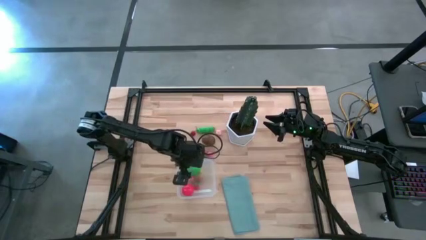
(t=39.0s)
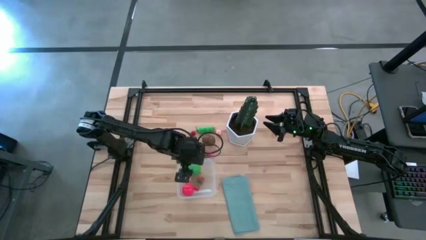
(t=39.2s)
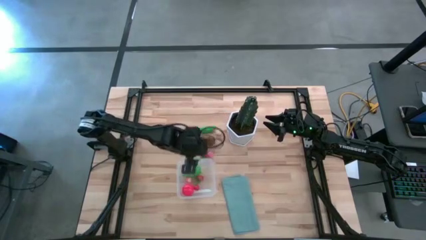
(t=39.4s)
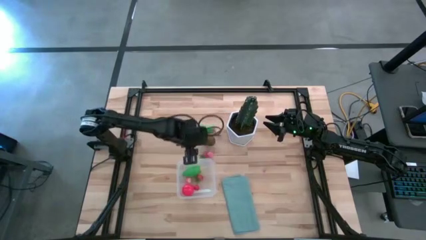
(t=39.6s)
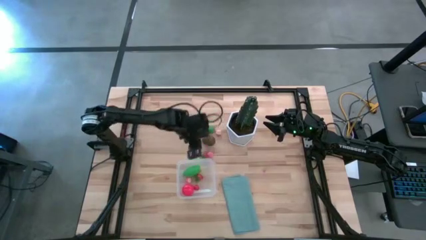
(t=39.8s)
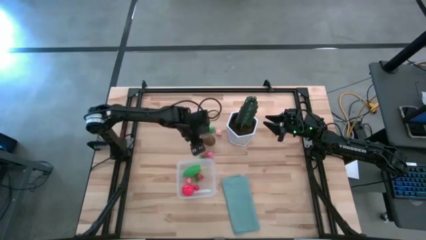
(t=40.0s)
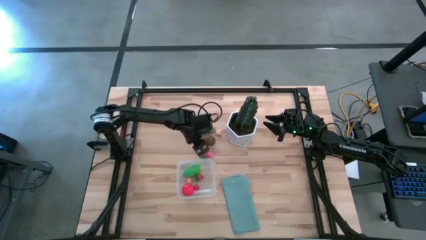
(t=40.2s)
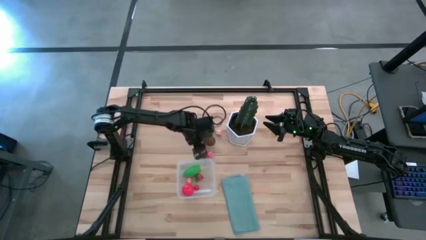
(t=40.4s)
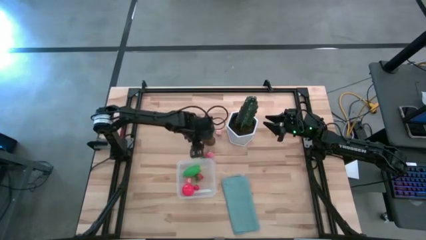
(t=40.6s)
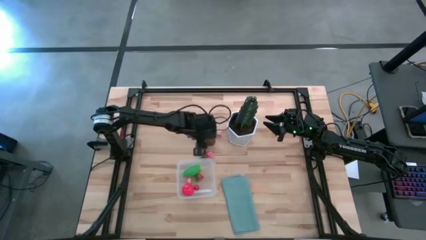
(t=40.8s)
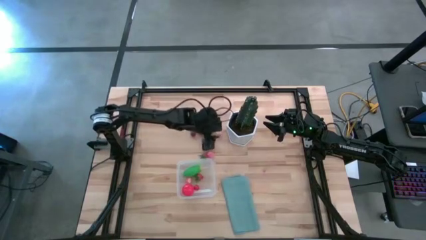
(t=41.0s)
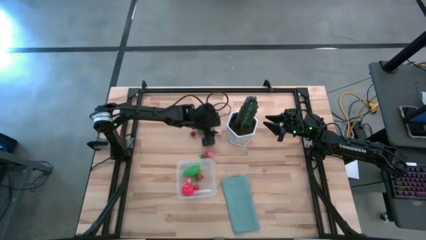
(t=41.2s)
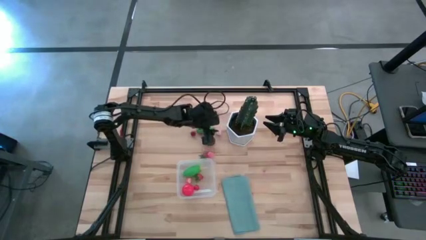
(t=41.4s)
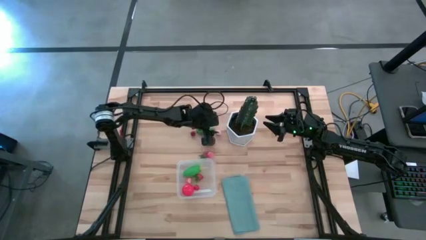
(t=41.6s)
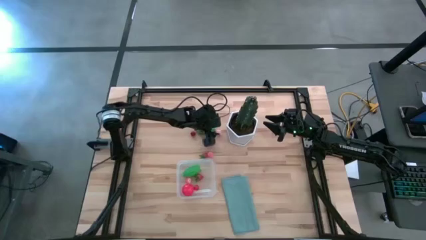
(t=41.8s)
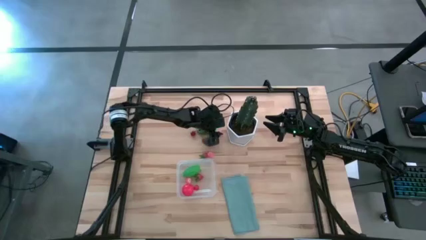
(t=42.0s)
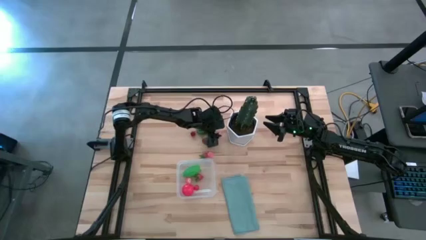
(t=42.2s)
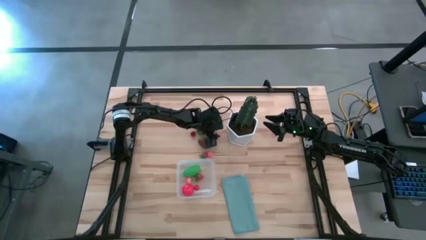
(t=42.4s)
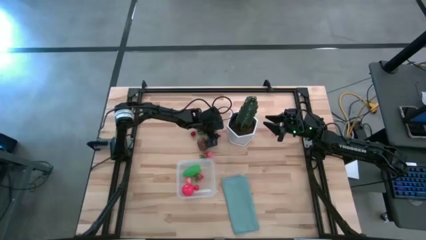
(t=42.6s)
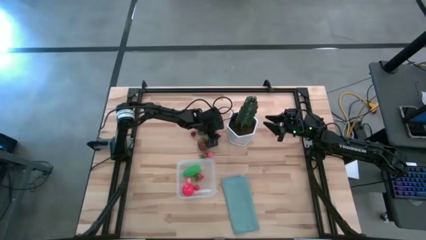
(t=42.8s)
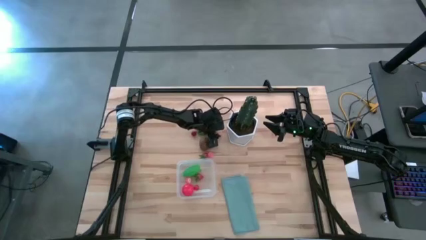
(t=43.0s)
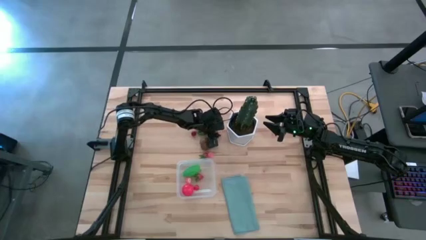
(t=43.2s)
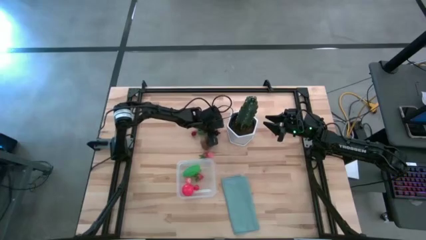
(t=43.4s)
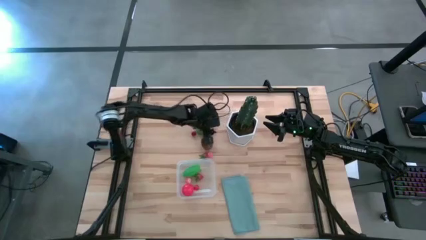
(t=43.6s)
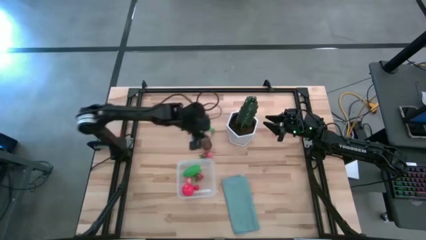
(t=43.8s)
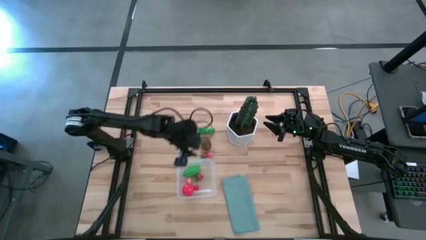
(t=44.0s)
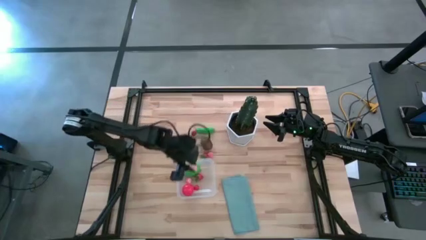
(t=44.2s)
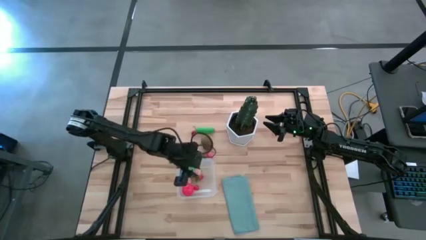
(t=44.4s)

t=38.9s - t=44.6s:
Task: Pick and placing Produce into tupperware
Put the pink peach into the transparent bin

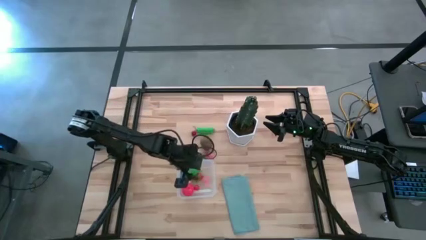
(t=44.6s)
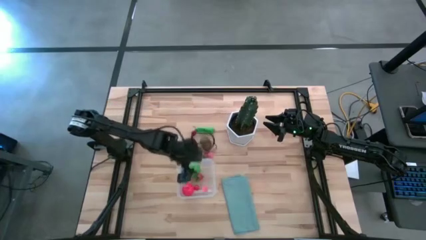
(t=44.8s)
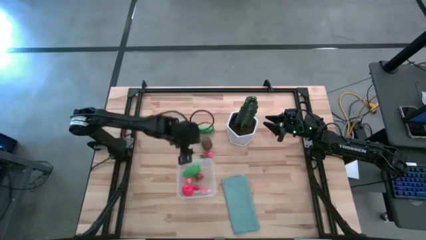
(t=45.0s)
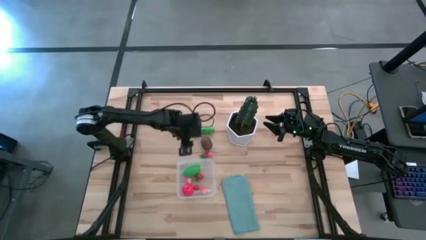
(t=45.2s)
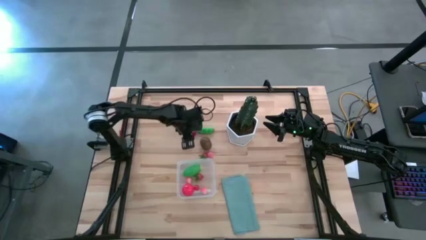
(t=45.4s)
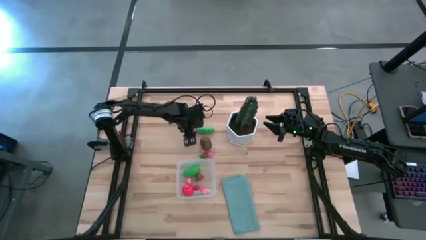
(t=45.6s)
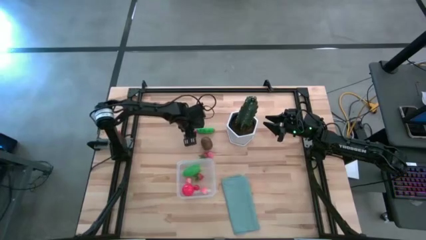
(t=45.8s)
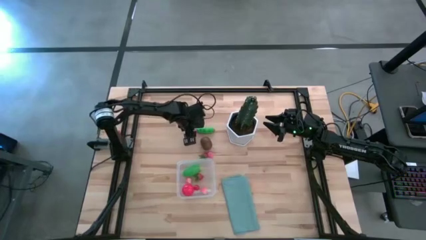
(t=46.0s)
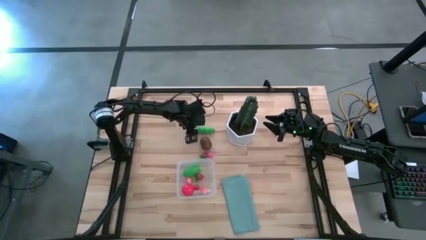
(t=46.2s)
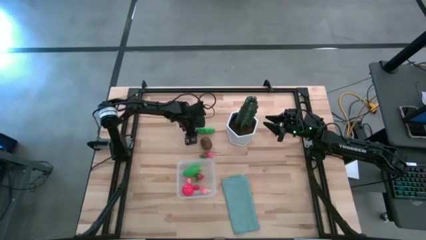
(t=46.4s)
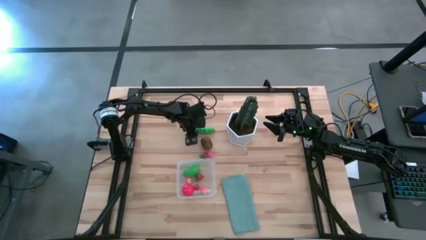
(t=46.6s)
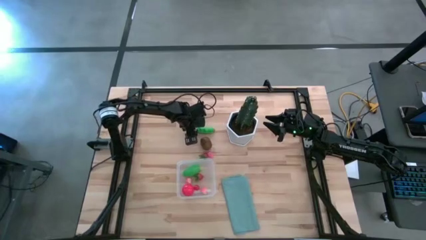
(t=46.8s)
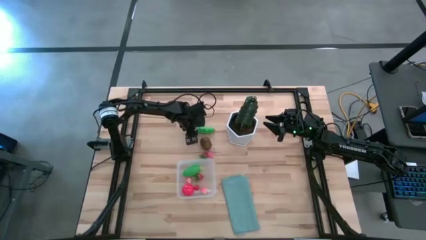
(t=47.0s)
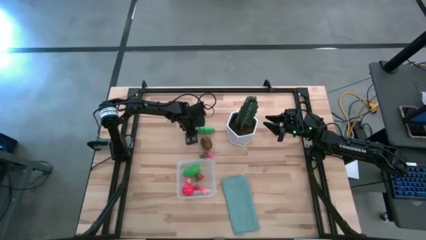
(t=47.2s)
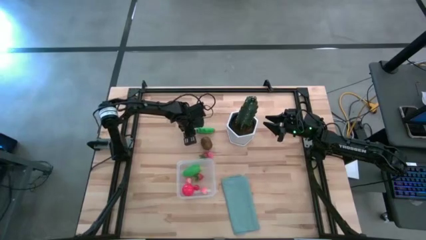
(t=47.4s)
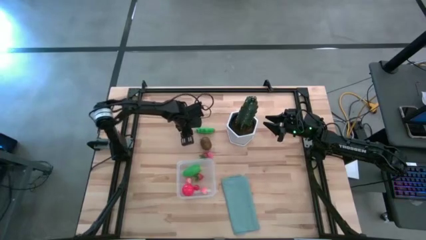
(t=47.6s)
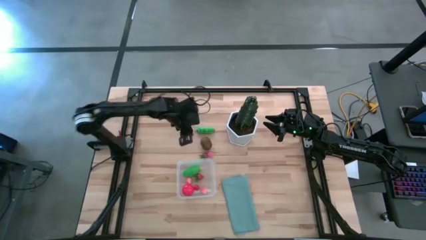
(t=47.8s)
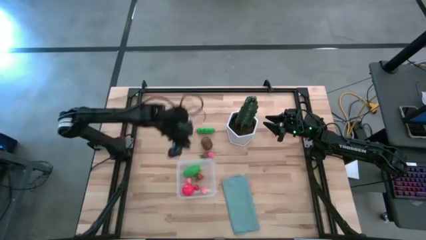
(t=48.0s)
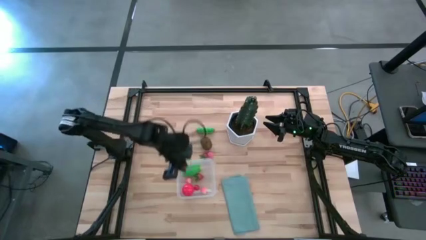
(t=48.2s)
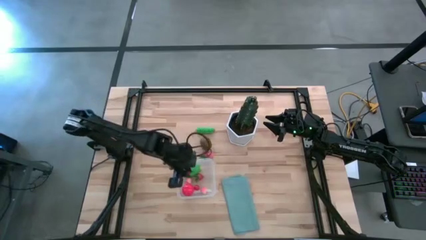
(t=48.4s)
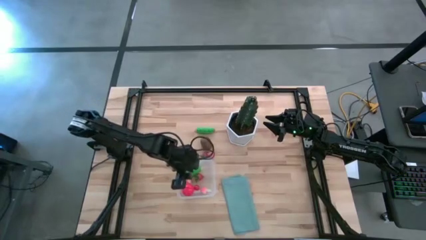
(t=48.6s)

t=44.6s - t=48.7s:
Put the red cherry into the transparent bin

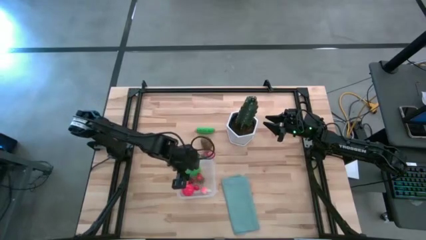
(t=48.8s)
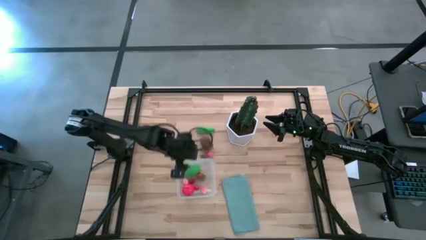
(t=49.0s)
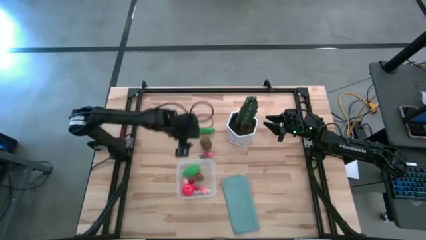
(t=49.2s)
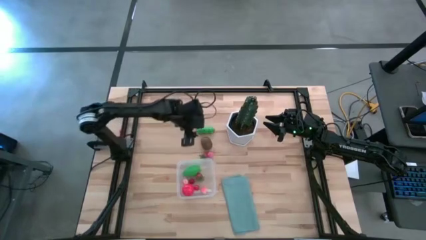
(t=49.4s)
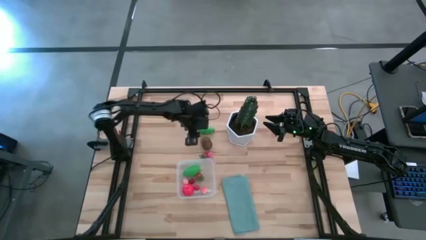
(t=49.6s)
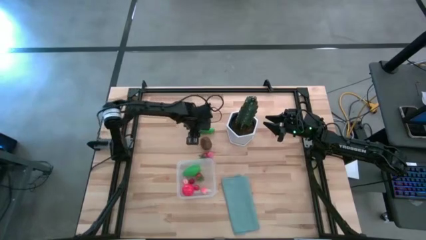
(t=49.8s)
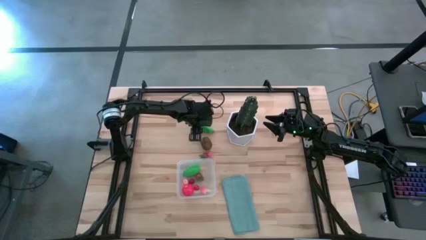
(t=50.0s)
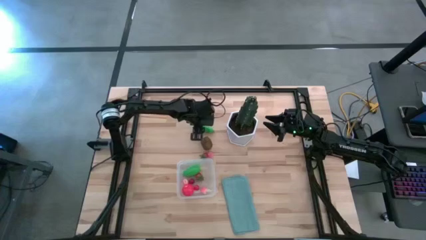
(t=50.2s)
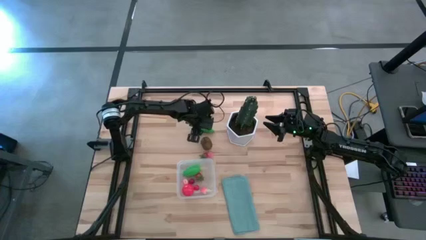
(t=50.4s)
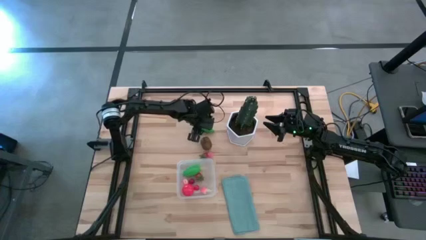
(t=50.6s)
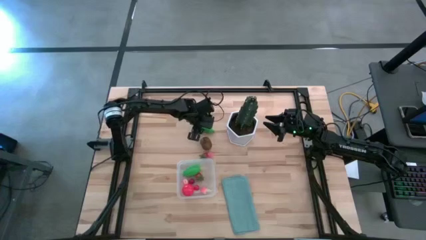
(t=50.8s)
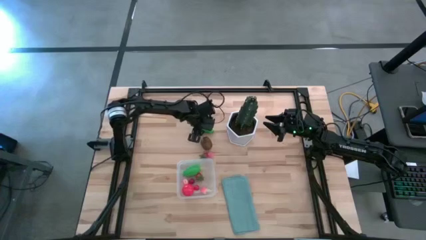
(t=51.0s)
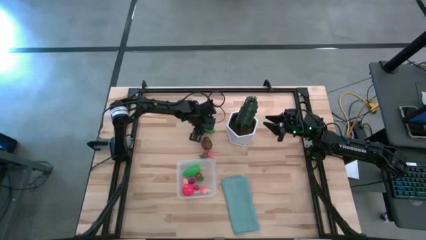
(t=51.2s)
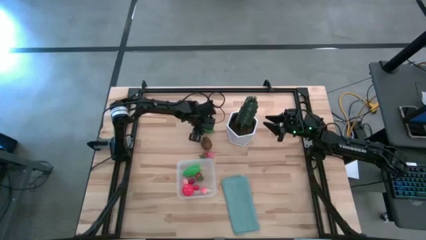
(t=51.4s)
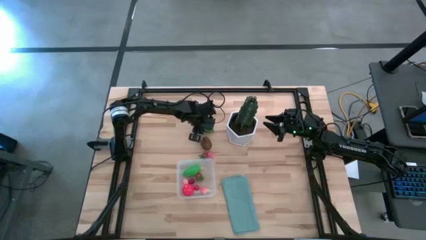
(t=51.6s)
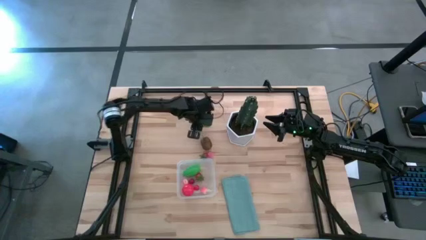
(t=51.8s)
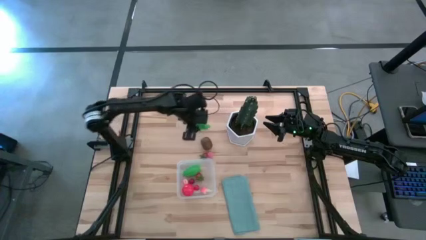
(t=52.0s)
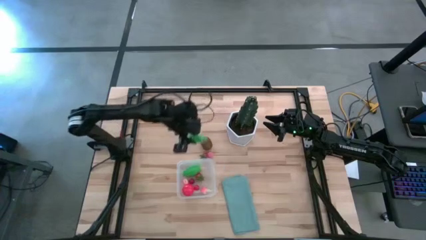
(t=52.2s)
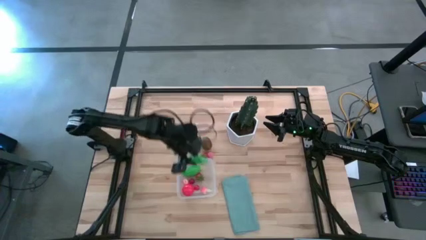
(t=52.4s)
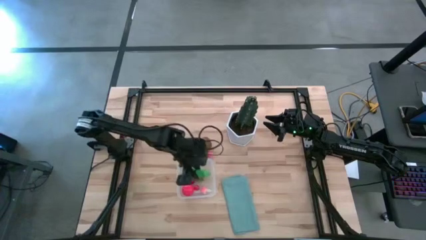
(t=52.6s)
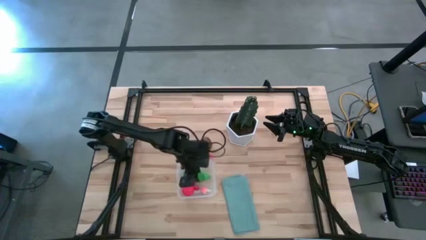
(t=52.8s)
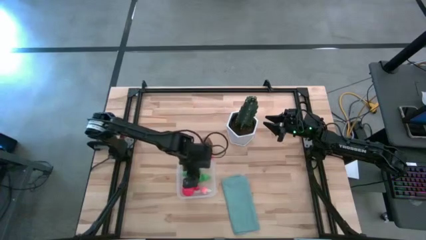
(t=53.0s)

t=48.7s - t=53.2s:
Put the green peas into the transparent bin

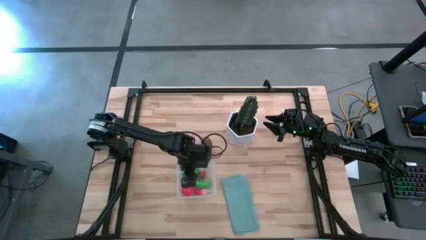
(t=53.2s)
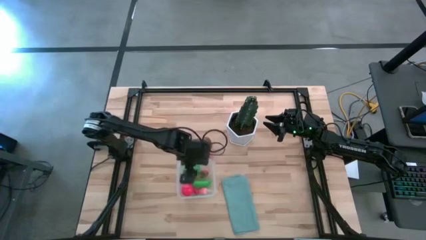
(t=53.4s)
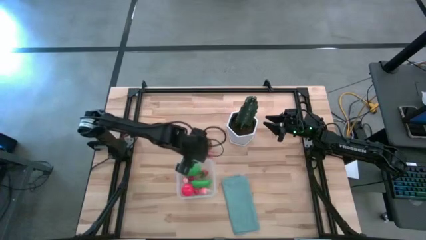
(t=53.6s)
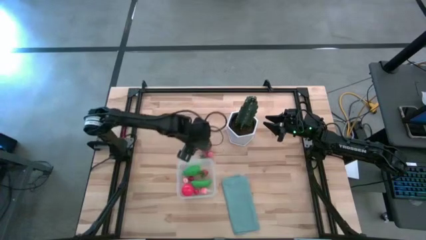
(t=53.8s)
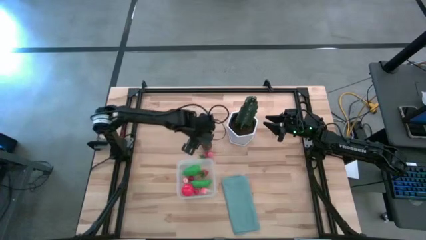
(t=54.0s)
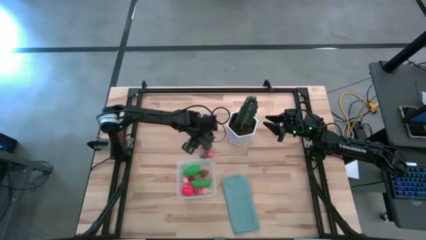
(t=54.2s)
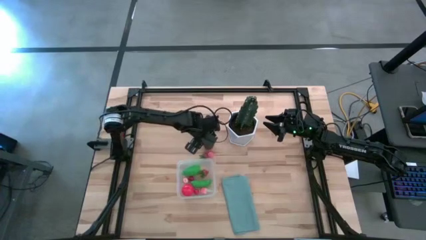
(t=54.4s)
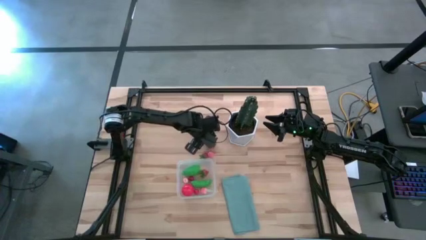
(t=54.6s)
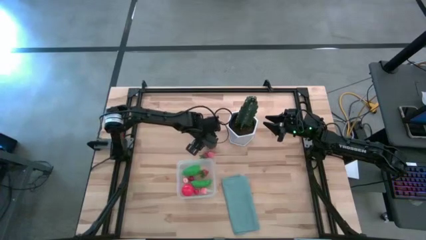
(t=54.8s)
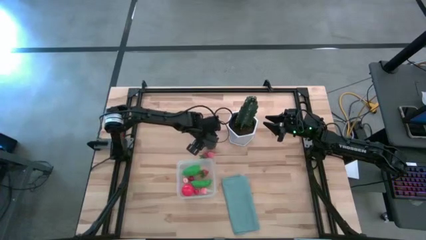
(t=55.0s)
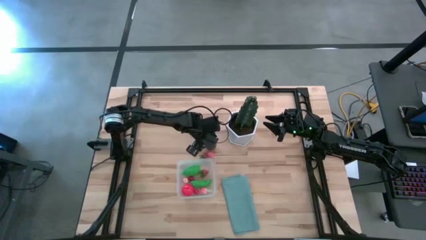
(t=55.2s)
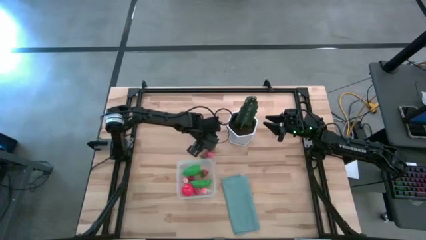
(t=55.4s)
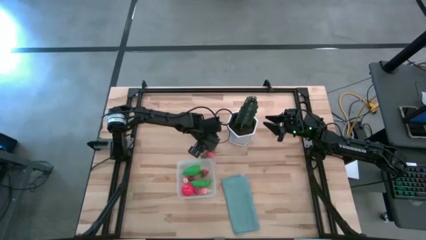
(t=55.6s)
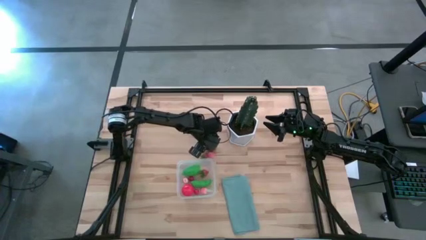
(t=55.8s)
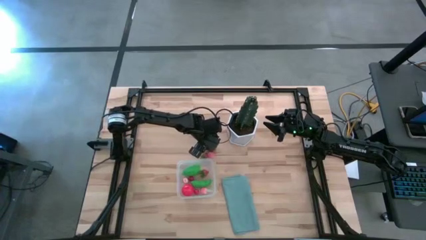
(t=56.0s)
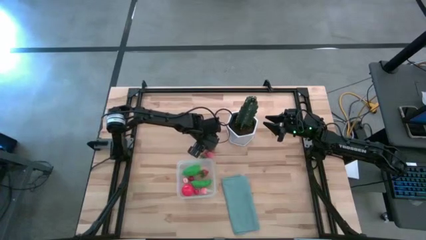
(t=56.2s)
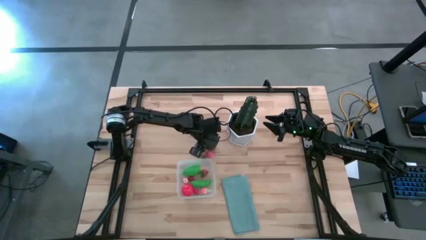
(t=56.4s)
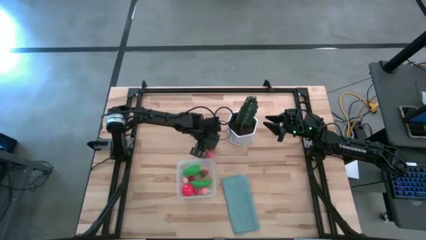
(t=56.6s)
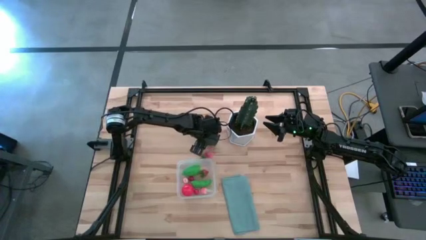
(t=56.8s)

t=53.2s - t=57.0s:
Put the kiwi into the transparent bin
